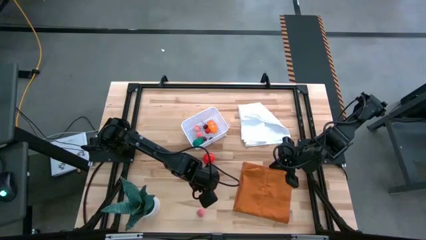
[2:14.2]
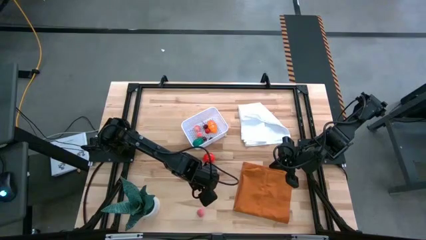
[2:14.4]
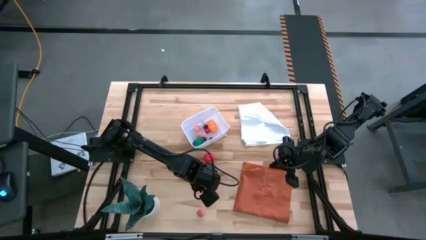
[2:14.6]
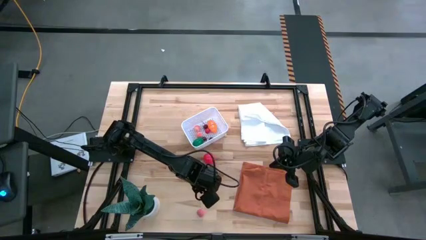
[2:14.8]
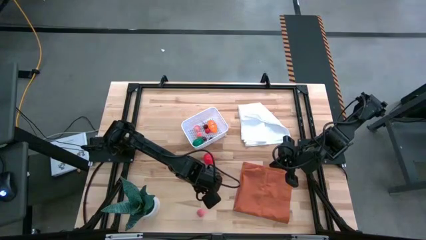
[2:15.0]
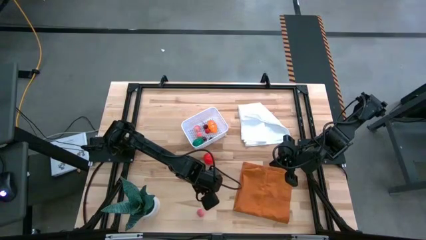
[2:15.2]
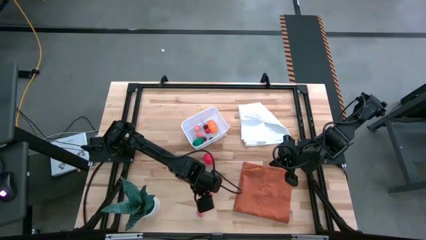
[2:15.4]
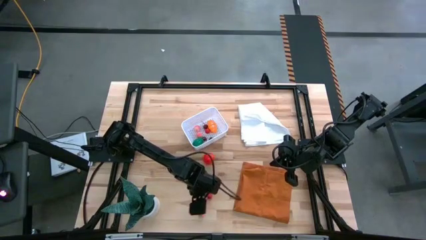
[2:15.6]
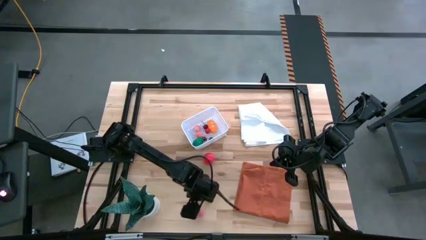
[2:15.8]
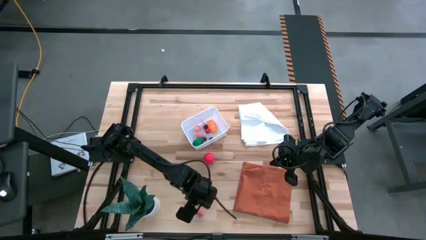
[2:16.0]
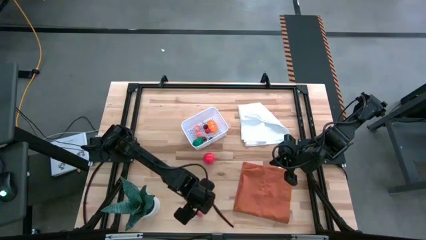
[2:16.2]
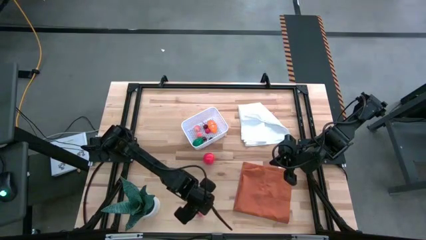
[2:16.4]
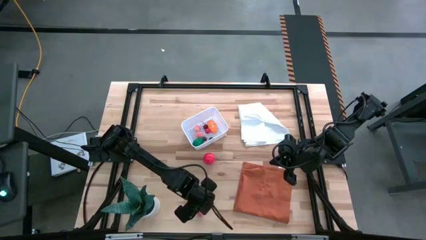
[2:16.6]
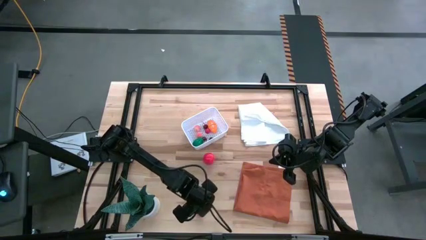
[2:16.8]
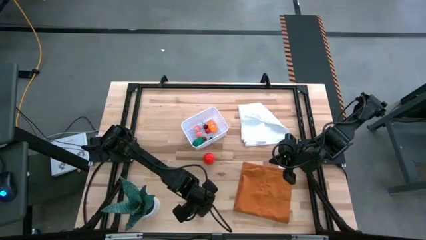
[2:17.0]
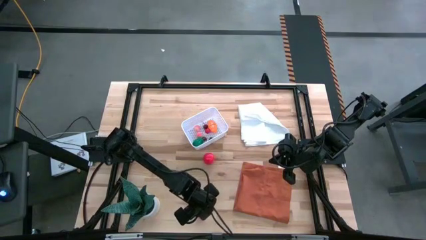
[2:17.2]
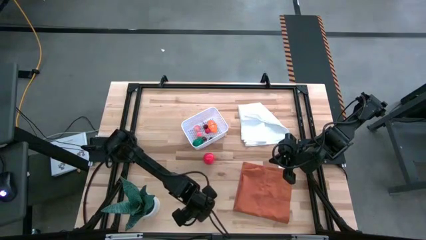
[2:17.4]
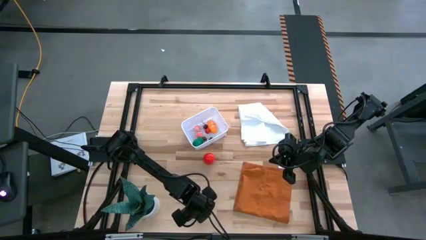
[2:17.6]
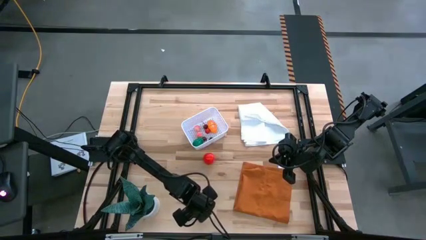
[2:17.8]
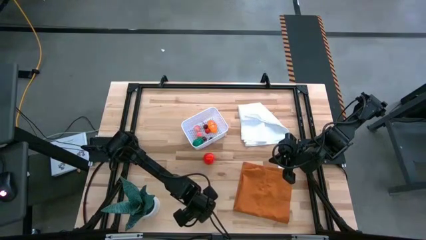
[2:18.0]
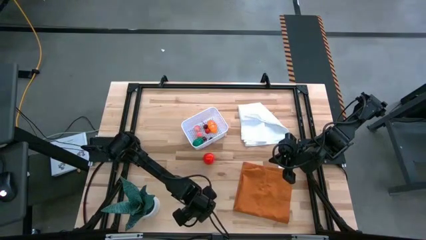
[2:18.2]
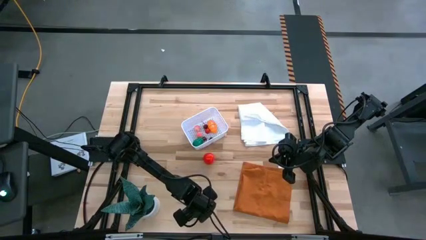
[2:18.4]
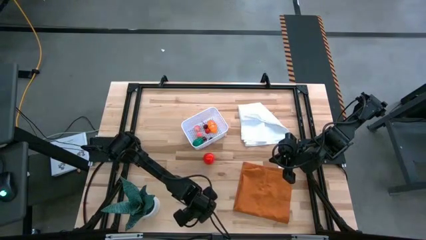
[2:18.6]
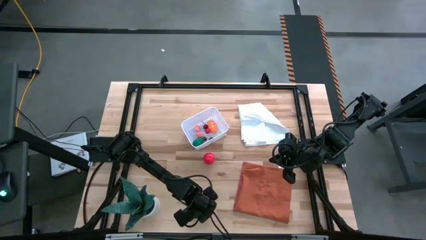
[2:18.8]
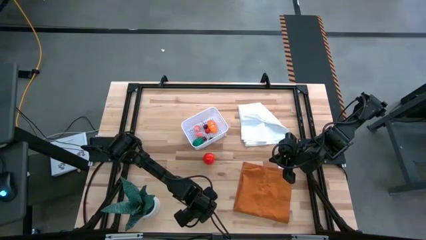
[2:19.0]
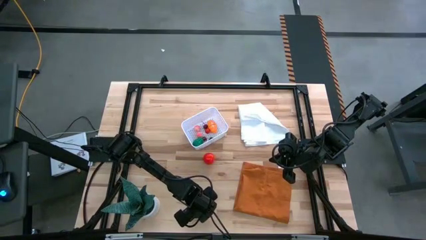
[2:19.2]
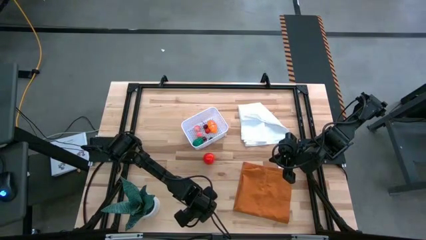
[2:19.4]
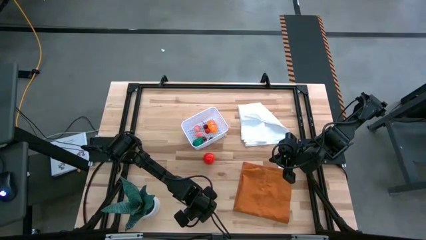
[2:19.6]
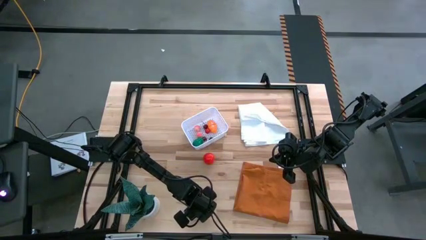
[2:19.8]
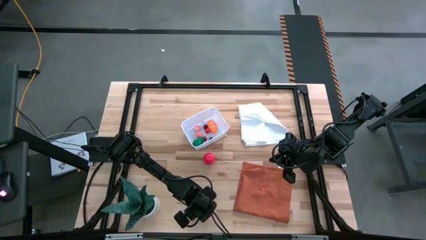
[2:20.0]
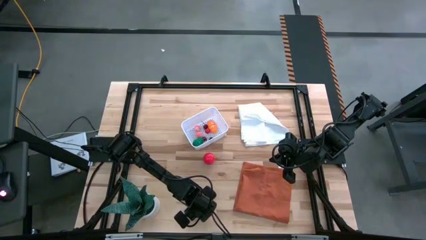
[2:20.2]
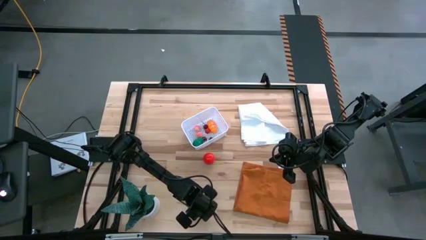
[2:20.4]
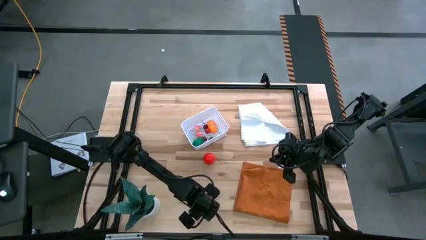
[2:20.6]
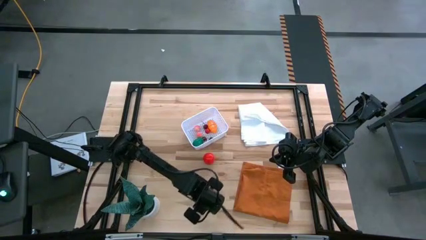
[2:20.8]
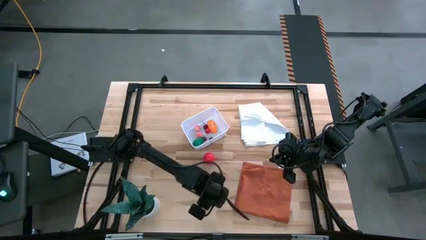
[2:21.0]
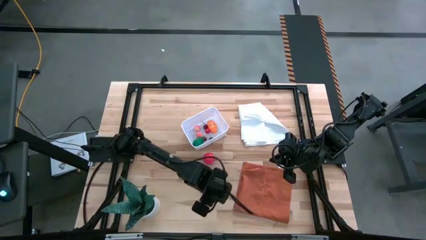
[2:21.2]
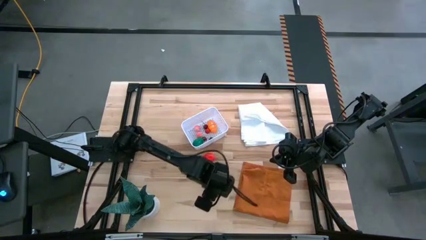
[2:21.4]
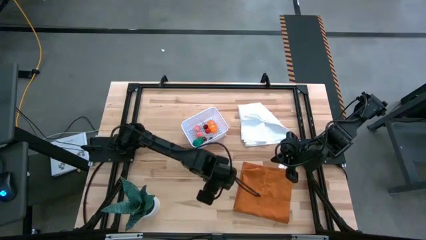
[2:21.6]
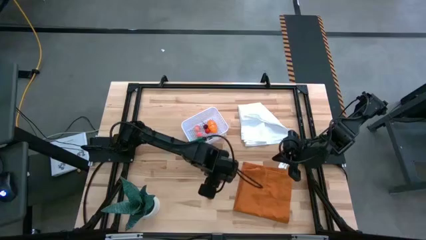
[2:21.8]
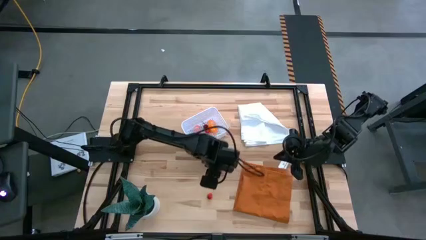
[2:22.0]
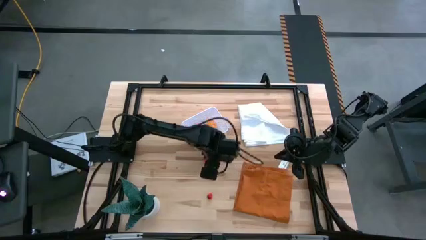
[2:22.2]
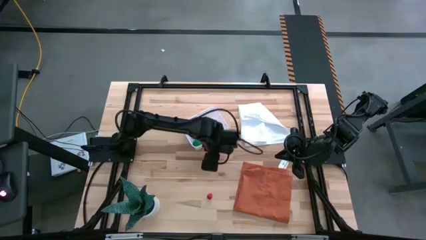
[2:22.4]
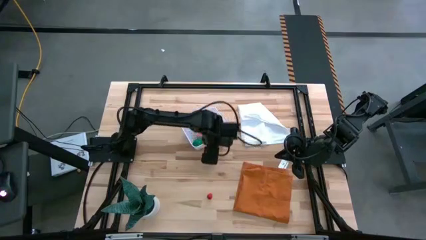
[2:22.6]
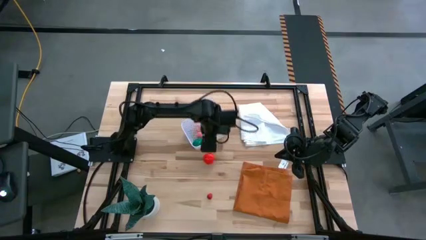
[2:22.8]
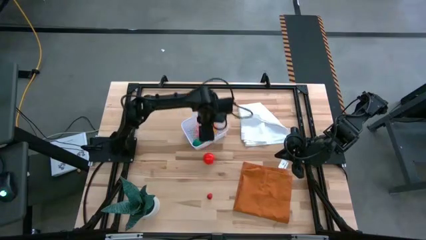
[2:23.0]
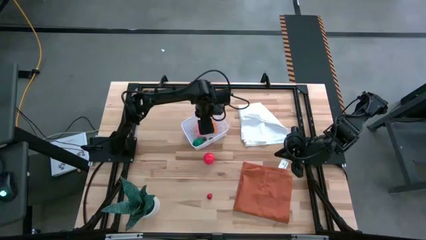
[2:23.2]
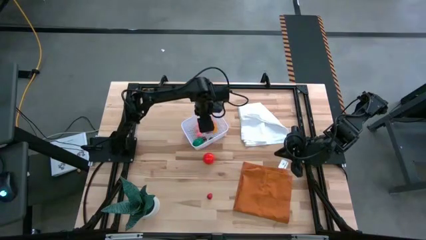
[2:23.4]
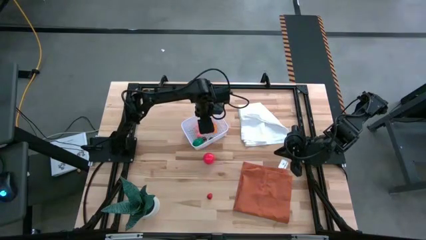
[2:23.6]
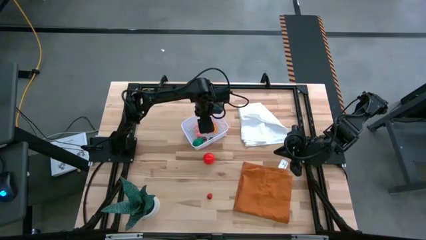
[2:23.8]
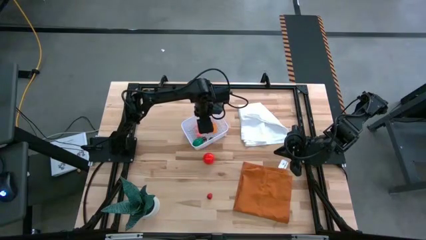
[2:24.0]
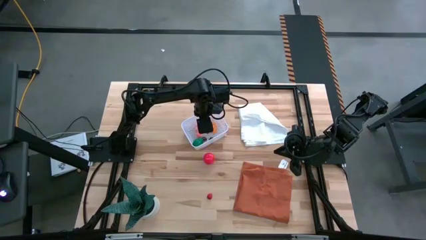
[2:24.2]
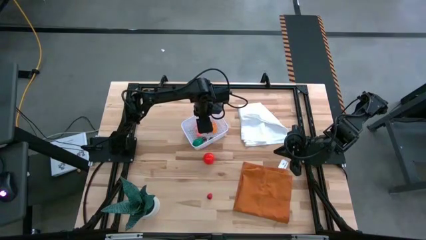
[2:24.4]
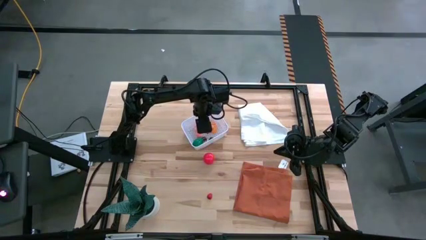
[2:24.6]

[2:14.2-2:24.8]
Task: Pick and placing Produce into tupperware
Put the apricot in the basket

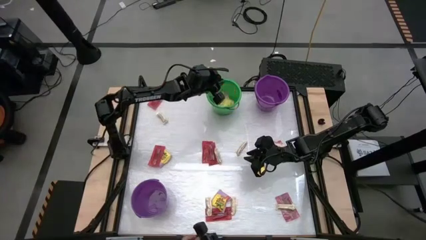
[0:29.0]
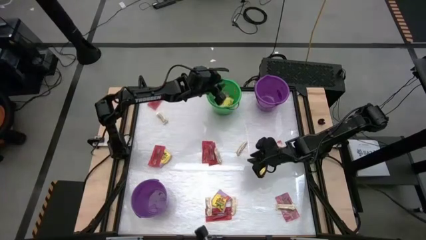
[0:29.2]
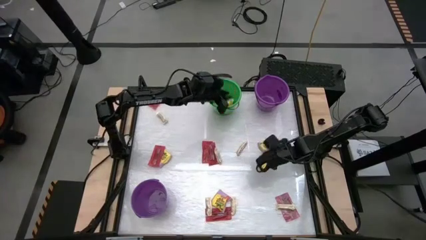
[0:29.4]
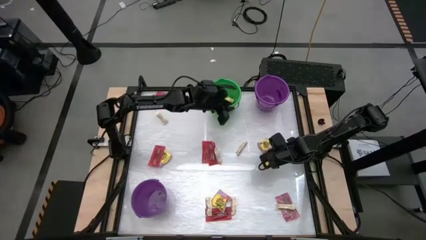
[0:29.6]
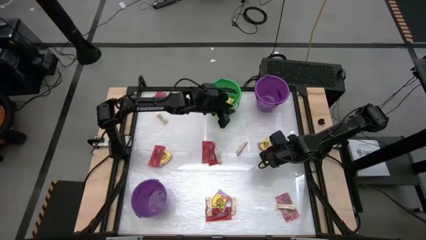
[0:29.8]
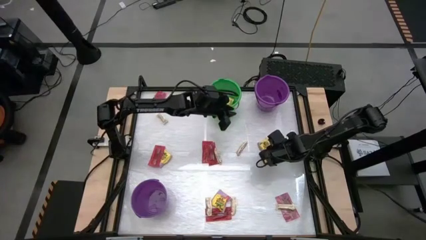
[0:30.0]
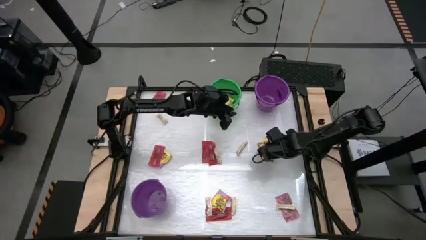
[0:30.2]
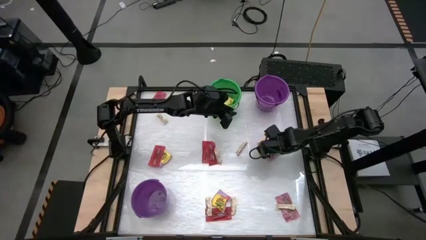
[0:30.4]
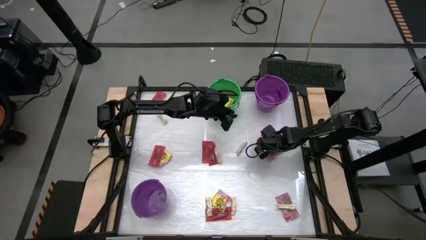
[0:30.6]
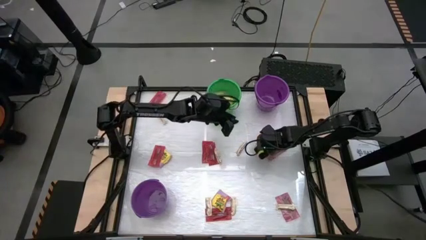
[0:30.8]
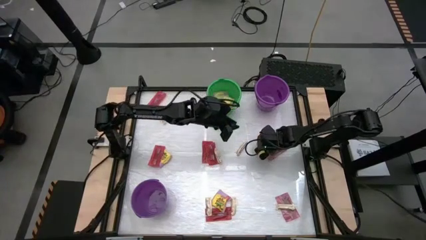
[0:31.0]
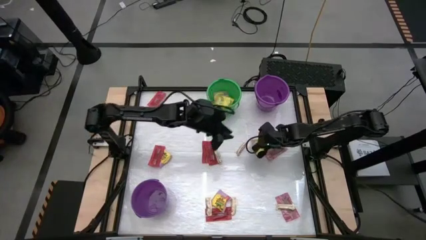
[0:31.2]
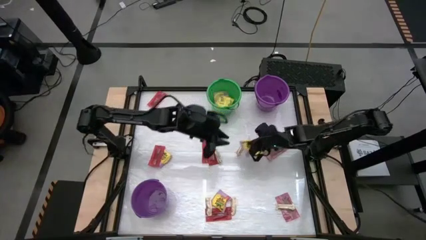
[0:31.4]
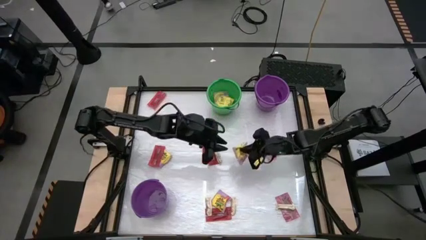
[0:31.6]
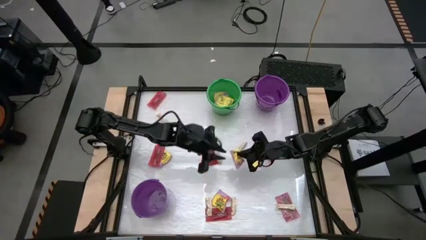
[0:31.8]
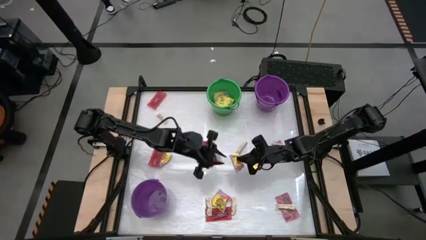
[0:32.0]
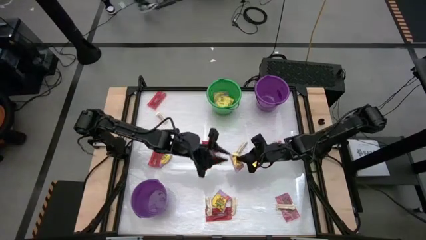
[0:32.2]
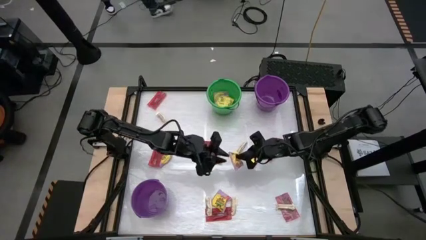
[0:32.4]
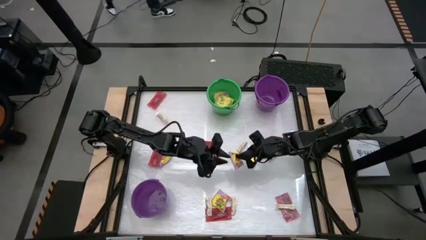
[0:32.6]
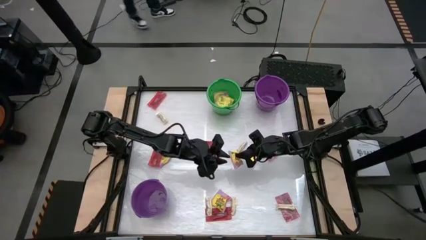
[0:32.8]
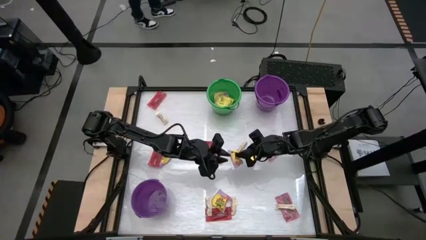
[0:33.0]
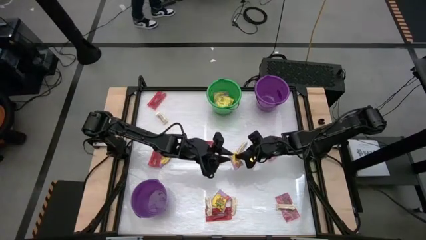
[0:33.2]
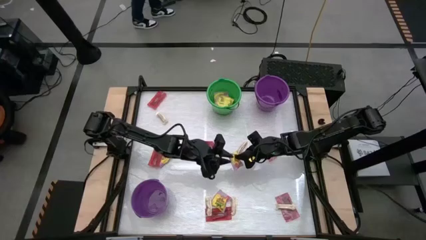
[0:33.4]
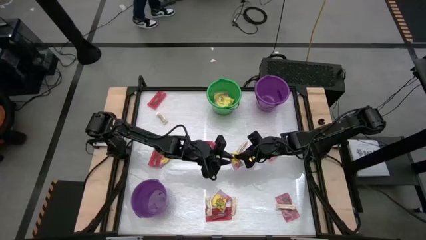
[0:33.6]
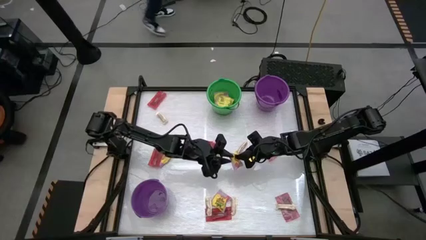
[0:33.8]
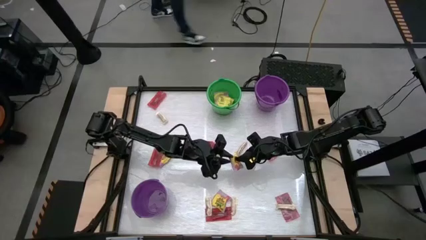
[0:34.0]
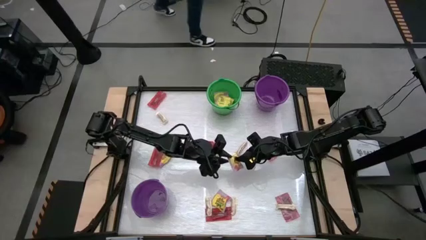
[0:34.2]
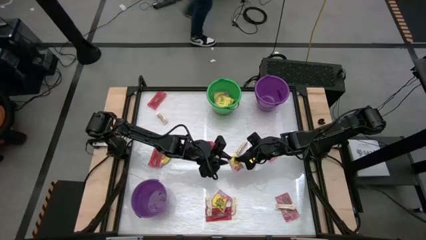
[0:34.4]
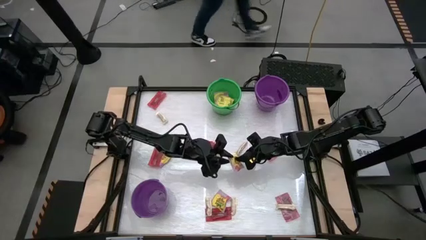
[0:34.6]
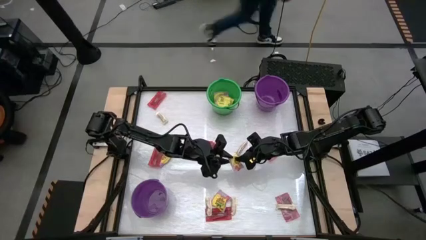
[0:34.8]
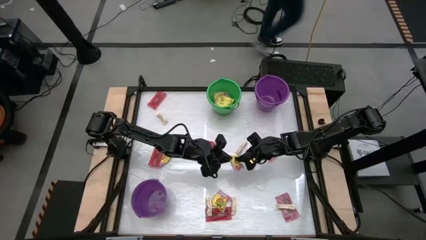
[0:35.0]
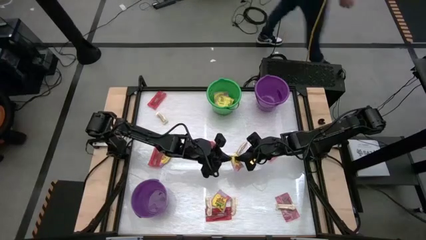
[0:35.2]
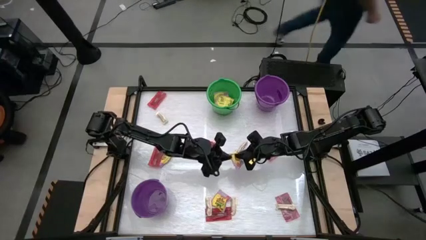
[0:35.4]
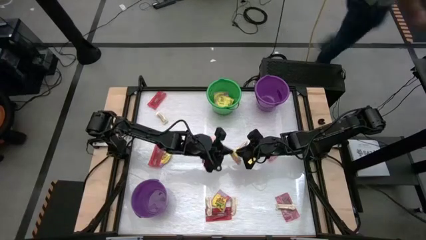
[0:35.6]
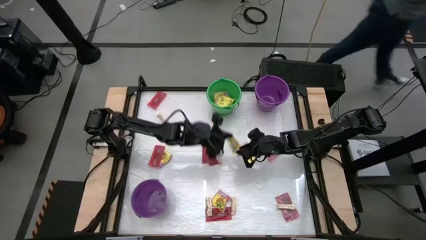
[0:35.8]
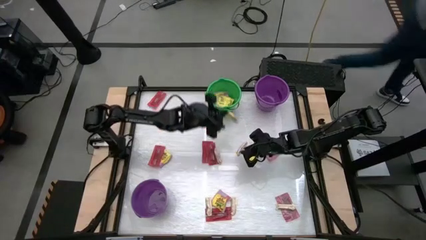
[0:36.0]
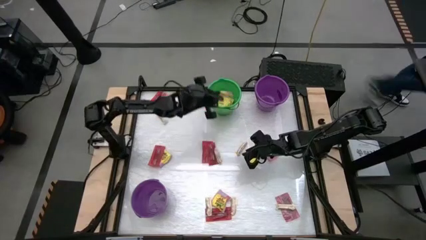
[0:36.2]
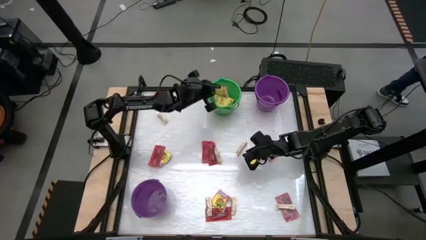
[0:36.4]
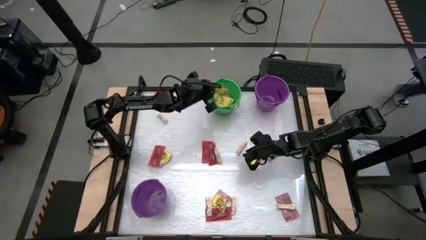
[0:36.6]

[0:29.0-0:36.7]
Task: Sort candy by brand, put in halloween buckets
Put the yellow candy into the green bucket
